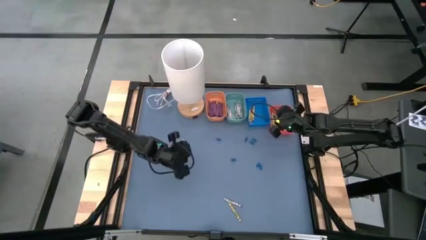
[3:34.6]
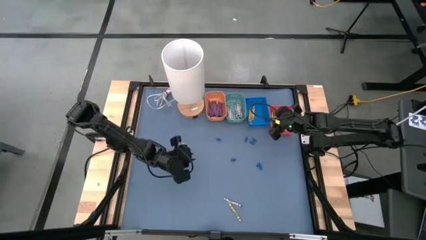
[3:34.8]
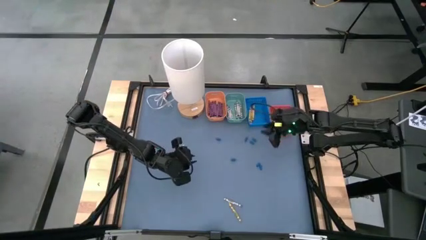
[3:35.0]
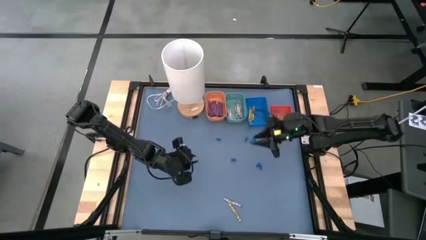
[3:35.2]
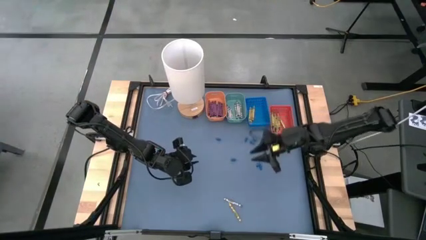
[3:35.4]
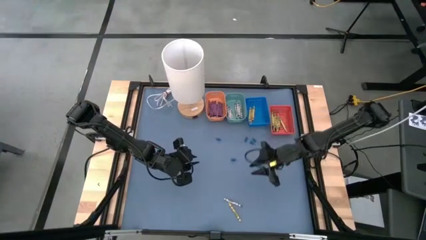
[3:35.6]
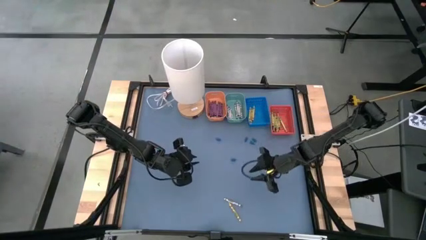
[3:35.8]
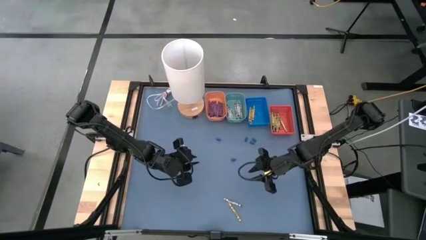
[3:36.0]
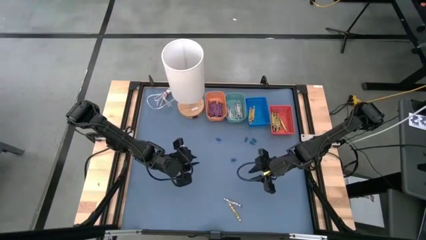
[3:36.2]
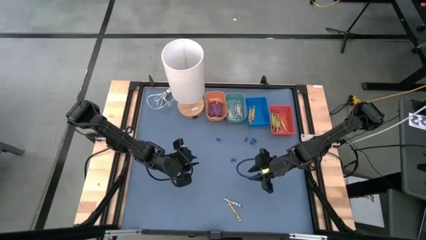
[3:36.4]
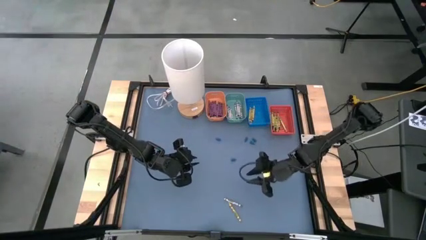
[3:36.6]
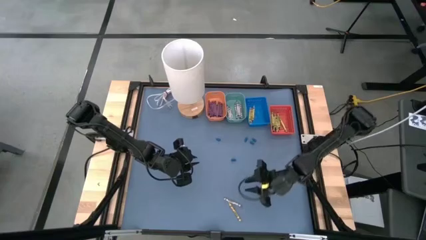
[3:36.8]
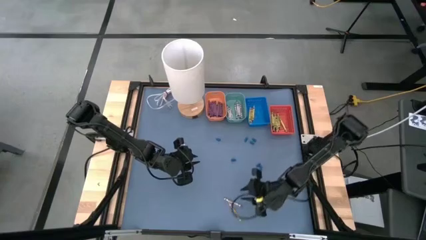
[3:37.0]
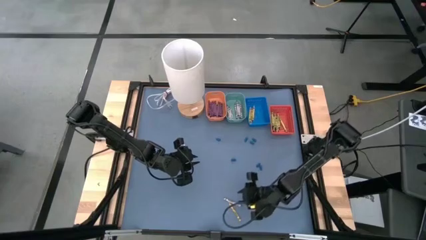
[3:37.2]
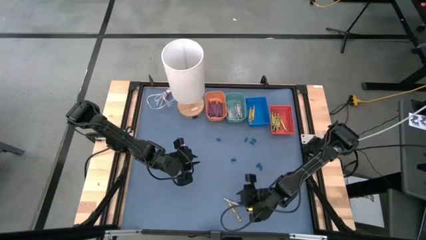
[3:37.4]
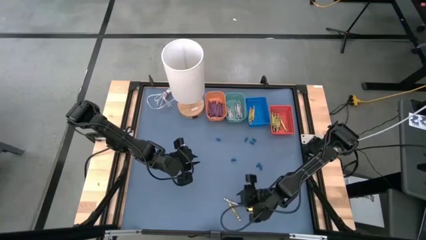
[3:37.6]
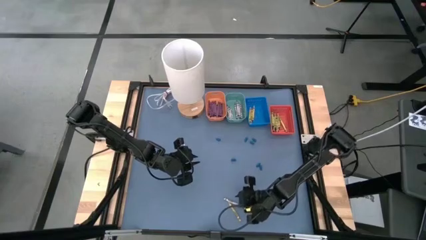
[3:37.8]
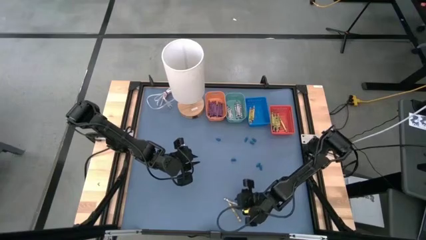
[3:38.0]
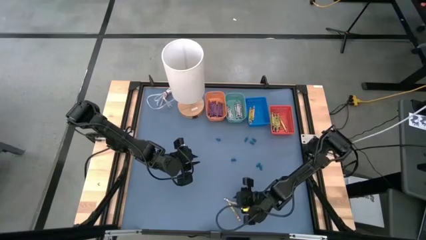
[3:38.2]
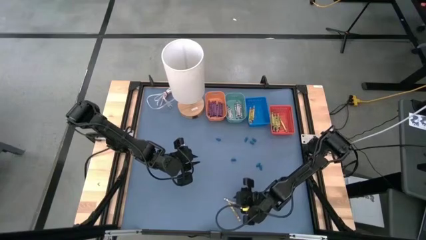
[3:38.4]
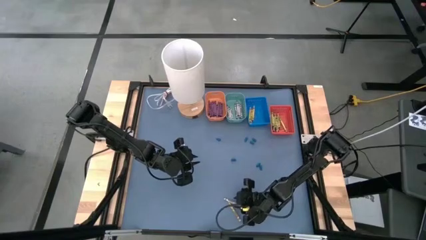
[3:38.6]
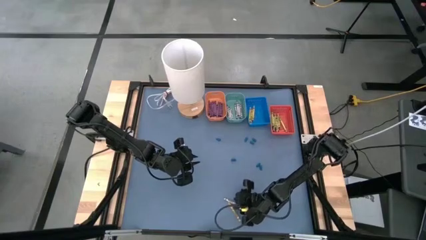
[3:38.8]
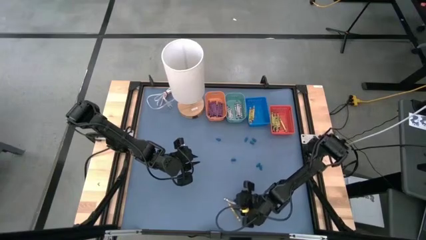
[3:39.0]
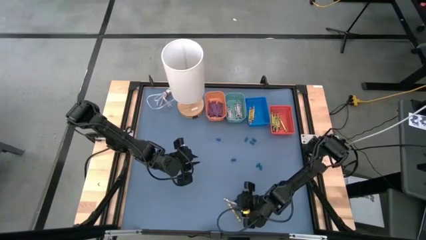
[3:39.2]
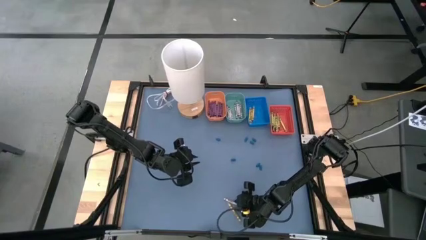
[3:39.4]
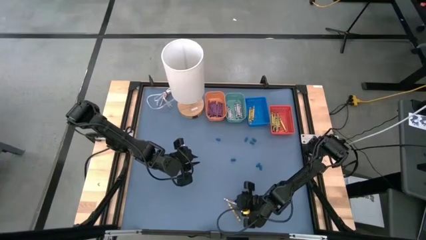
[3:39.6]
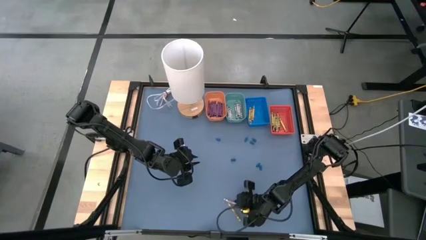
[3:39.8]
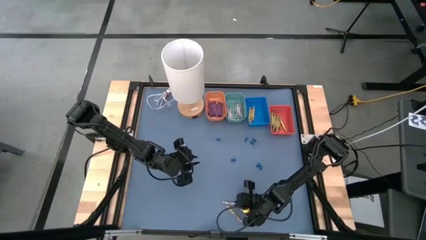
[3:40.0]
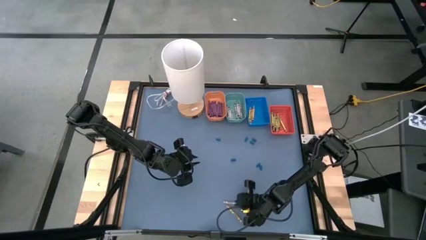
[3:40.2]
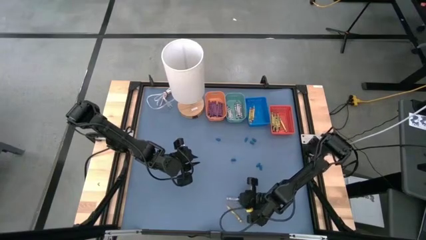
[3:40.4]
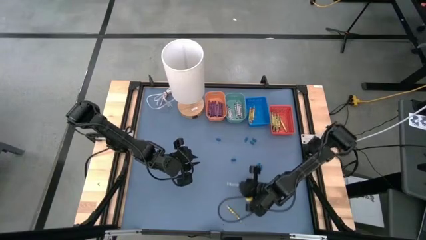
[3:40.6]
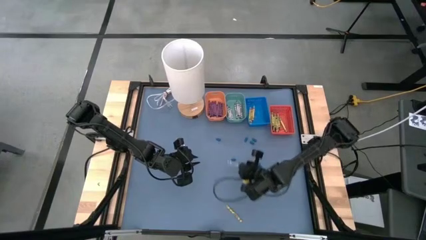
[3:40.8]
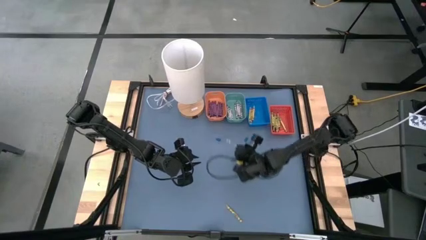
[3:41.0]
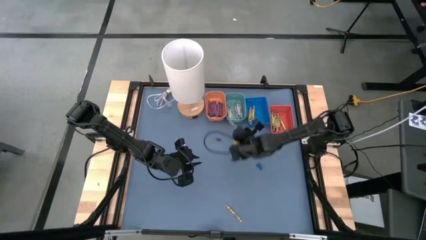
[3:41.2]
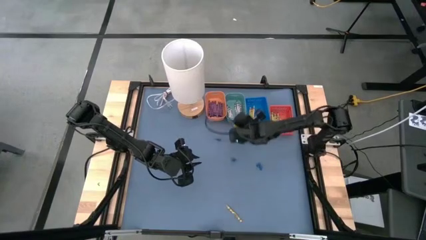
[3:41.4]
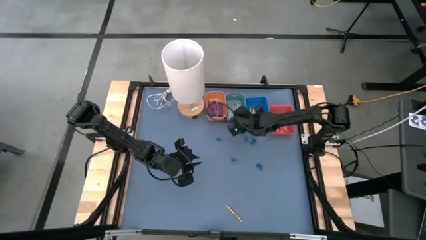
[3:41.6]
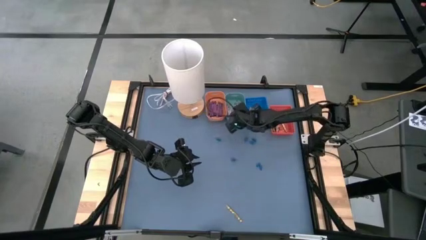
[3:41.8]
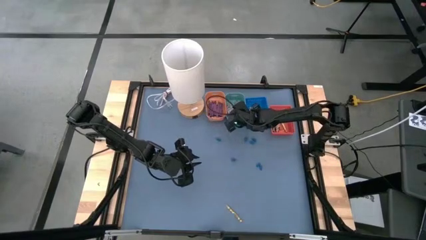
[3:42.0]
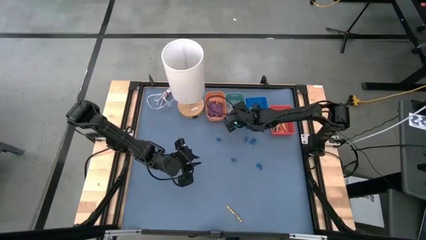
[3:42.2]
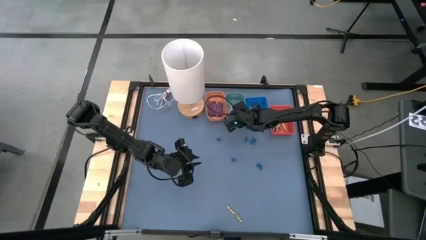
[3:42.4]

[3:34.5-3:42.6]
Task: Sort crayons
Put the gray crayon into the green bin

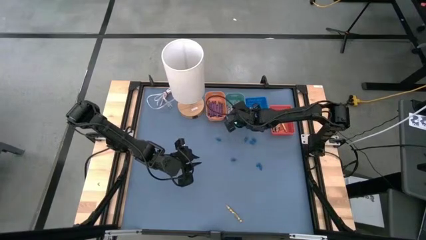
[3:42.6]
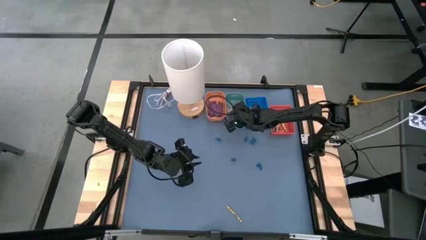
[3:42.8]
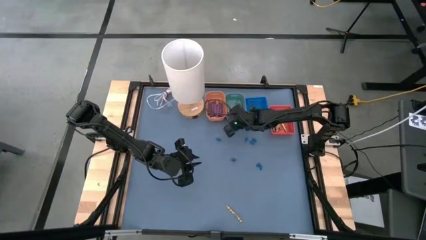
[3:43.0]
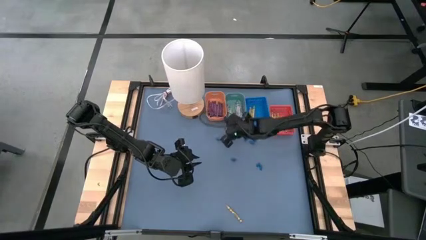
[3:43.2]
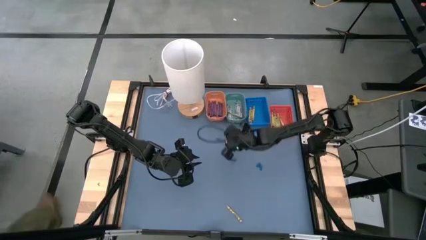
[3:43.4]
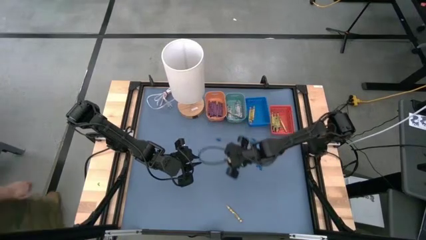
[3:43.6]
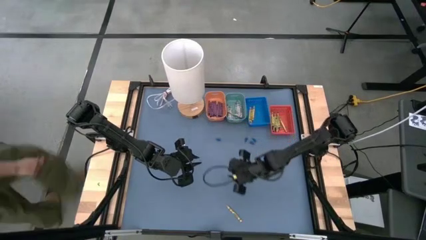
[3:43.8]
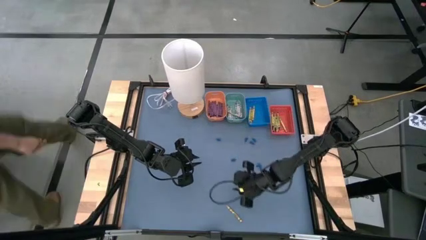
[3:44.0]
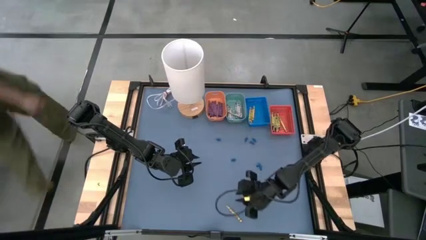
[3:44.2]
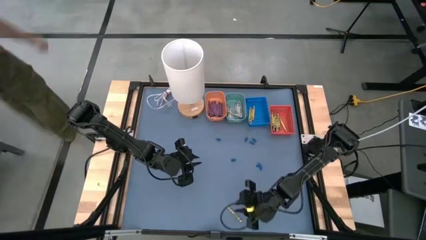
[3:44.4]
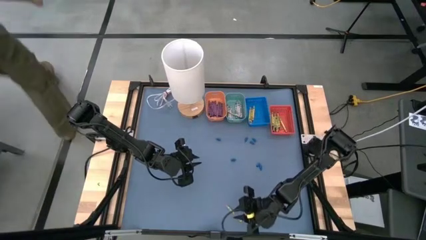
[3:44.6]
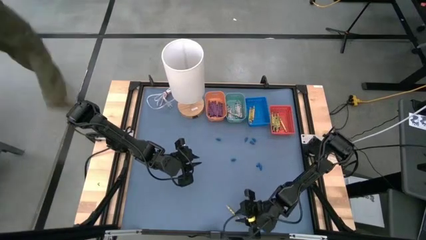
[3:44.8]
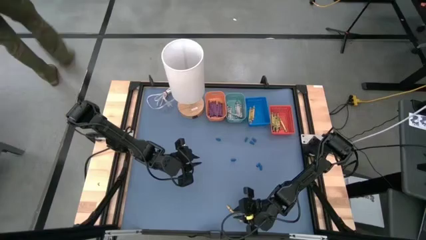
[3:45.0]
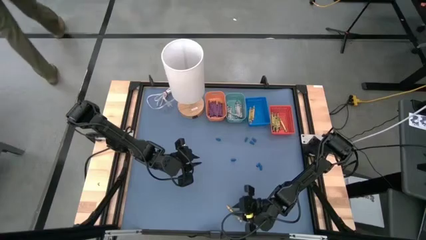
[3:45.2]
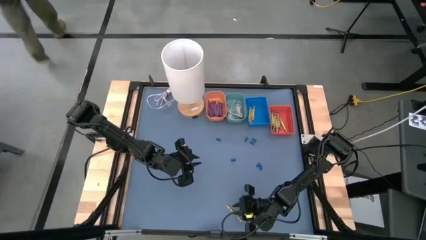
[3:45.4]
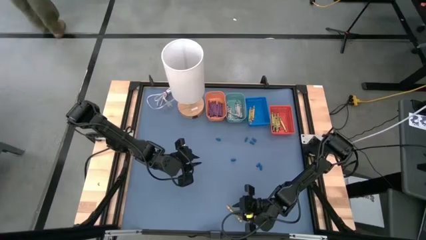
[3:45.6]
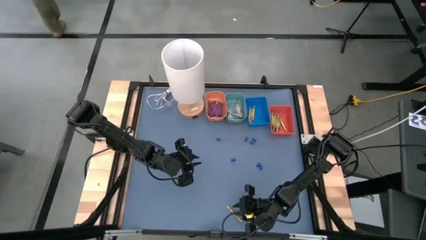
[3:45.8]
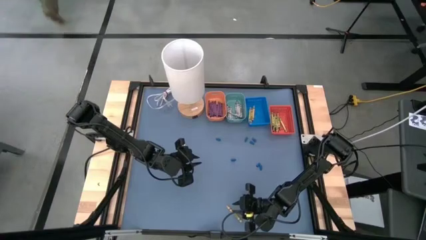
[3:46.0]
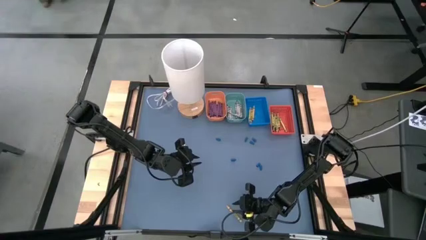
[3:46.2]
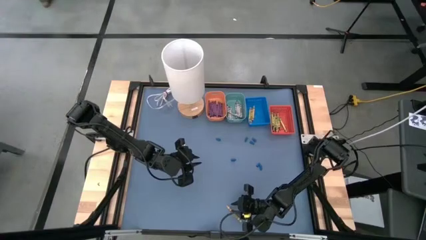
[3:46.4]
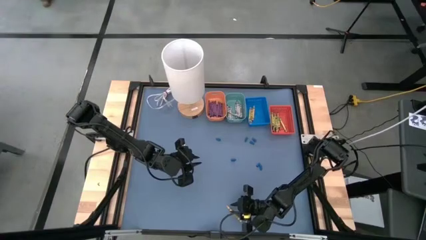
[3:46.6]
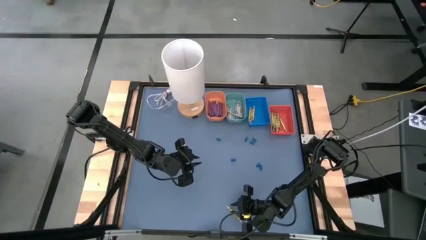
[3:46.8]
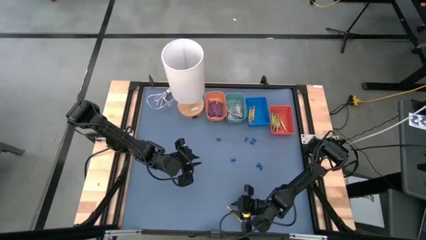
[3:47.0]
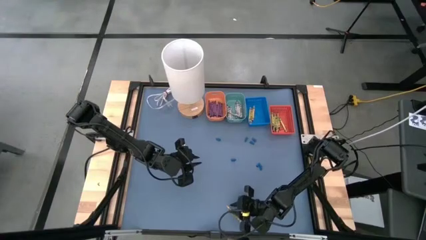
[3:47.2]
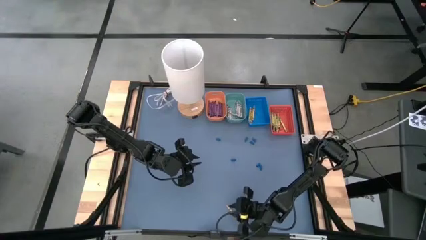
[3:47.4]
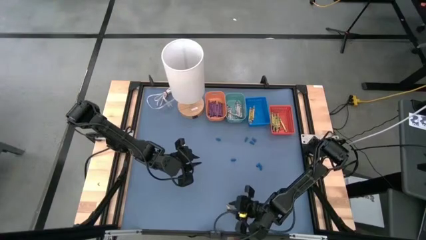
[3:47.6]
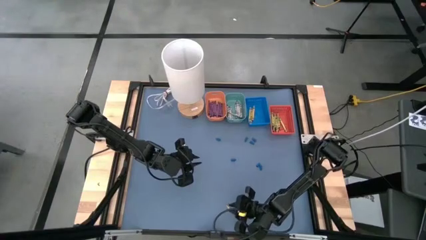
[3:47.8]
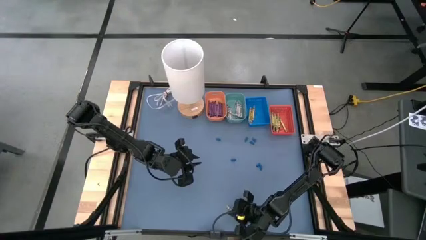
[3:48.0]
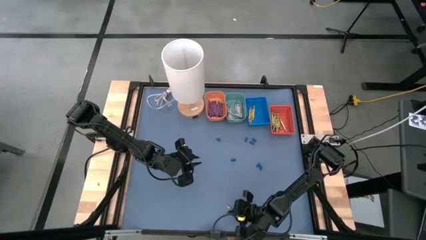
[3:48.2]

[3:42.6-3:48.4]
Put the yellow crayon into the blue bin

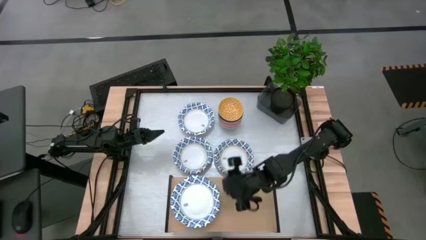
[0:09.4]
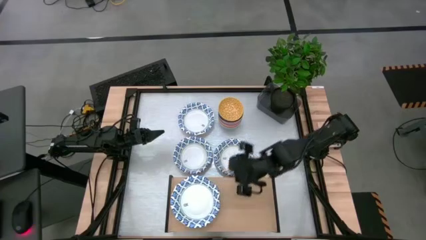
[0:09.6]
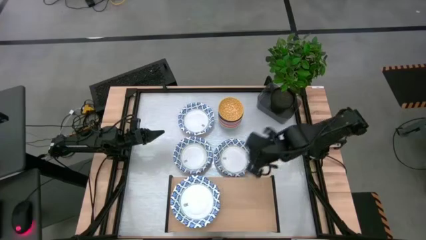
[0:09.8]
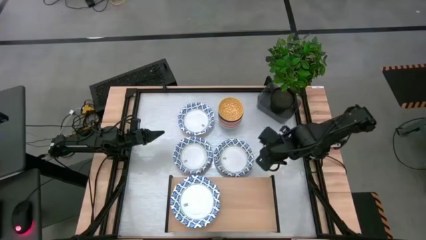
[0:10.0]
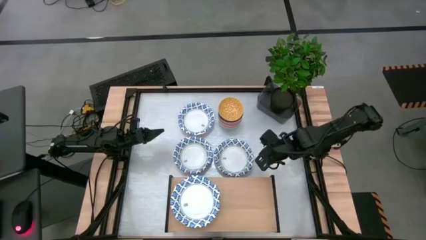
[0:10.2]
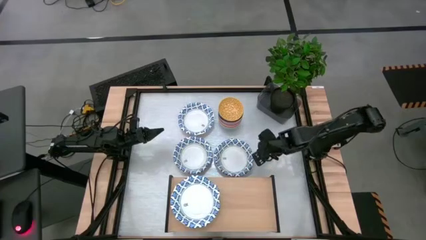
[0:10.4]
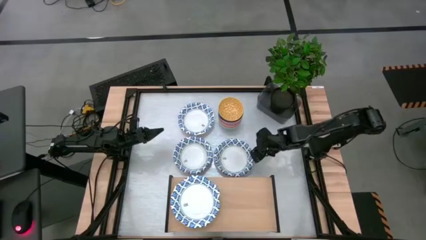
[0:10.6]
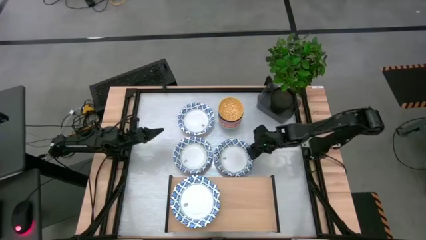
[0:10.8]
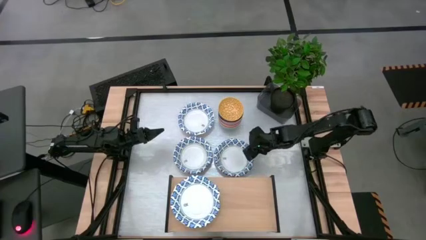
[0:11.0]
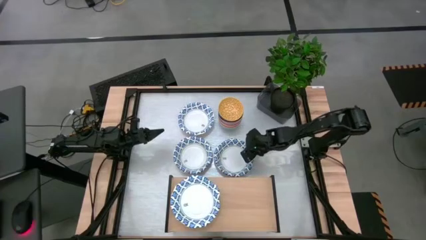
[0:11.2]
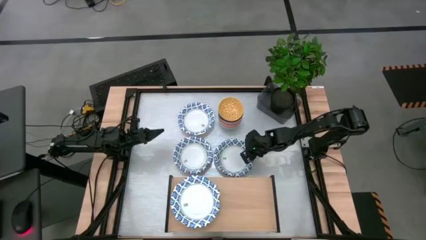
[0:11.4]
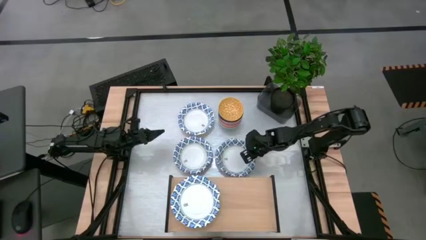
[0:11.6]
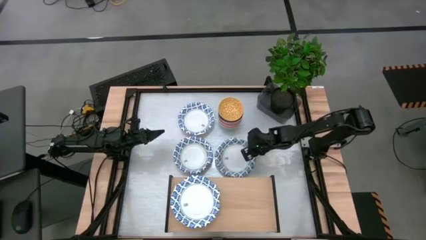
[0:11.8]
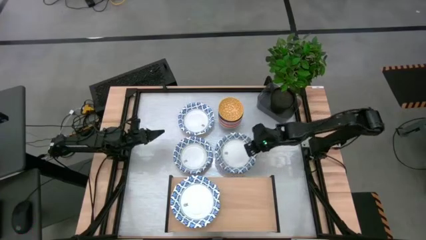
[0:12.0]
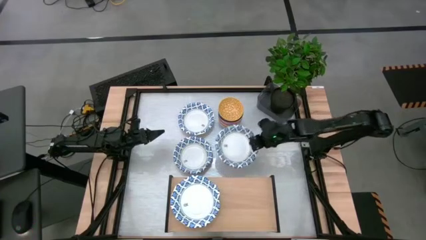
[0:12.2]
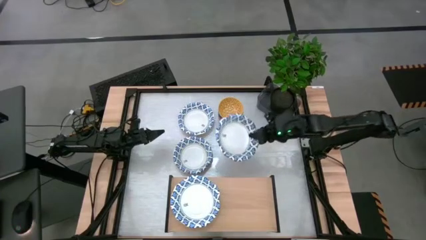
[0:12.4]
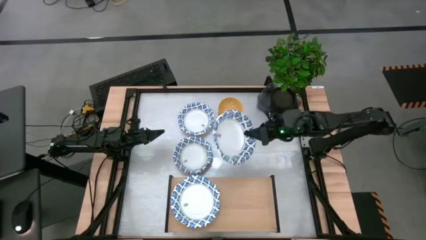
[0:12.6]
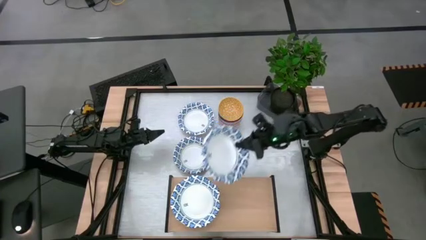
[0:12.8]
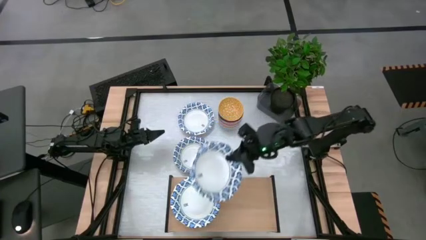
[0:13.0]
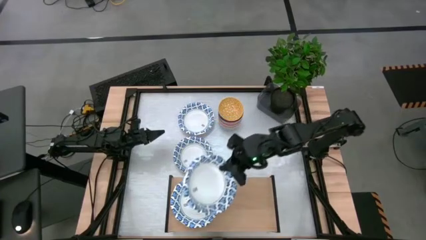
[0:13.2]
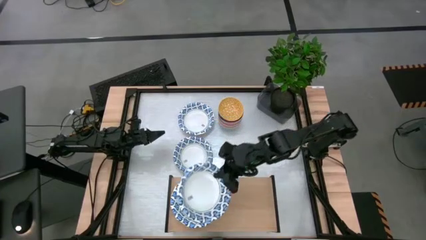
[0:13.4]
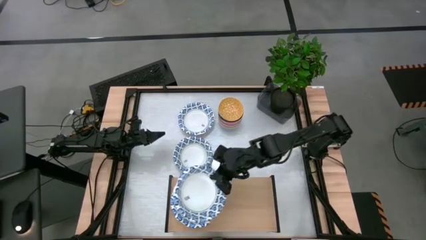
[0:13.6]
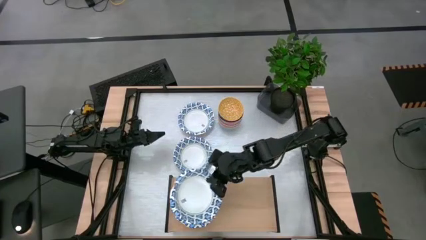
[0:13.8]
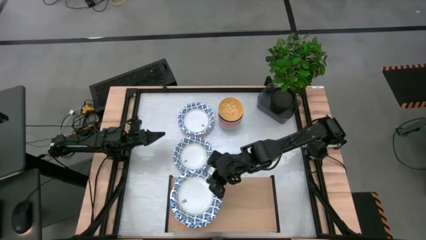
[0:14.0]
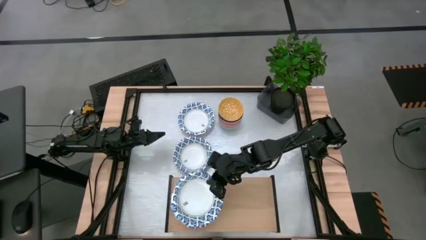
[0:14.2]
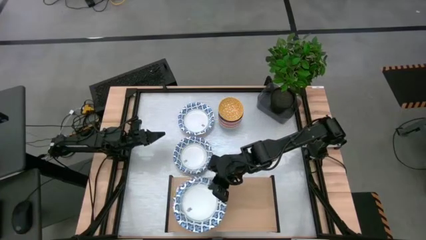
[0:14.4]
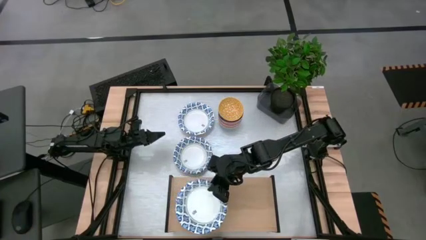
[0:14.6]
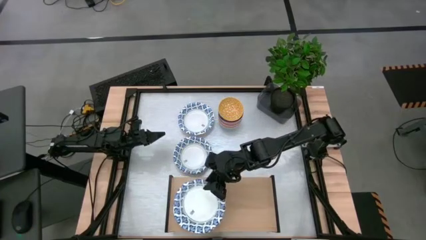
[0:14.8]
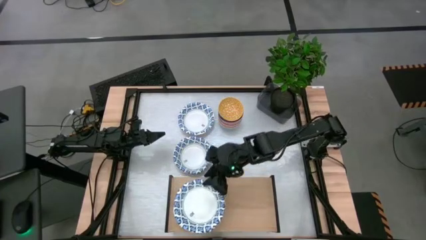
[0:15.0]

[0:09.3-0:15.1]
Task: Place and stack plates onto a shelf
Stack the right white plate on top of the white plate on the shelf
